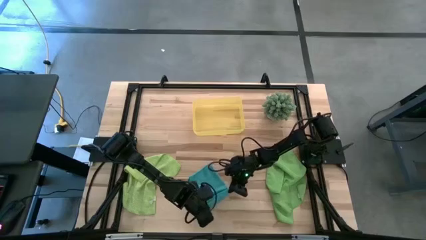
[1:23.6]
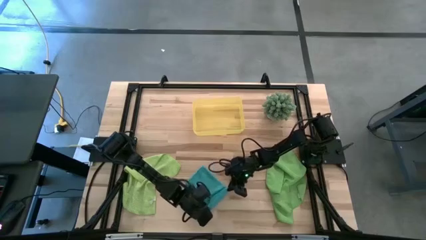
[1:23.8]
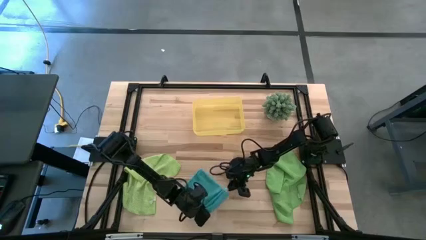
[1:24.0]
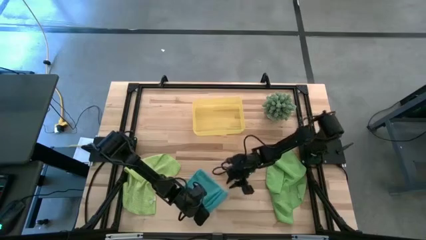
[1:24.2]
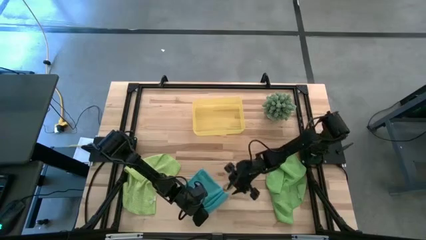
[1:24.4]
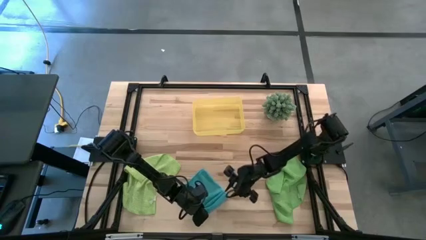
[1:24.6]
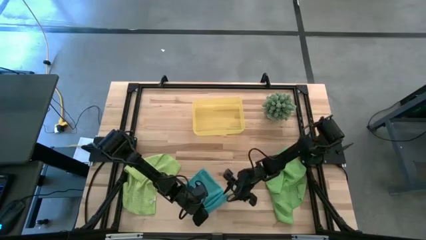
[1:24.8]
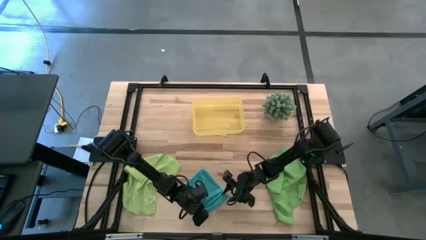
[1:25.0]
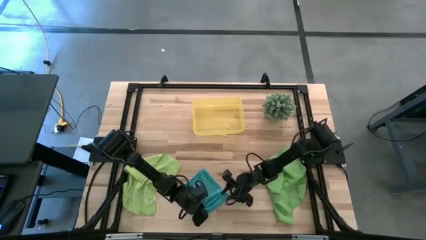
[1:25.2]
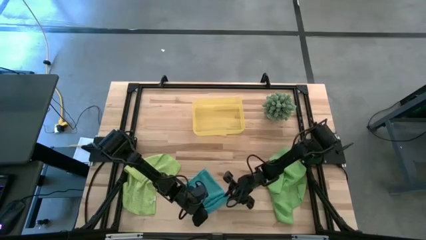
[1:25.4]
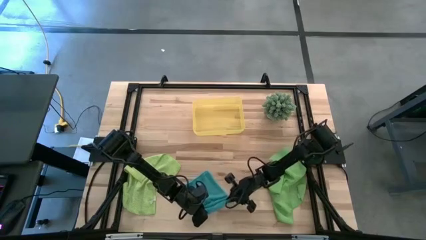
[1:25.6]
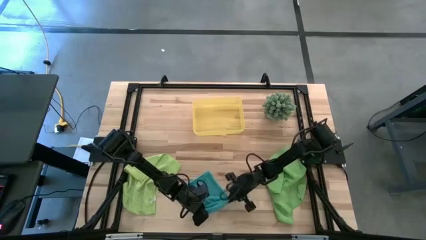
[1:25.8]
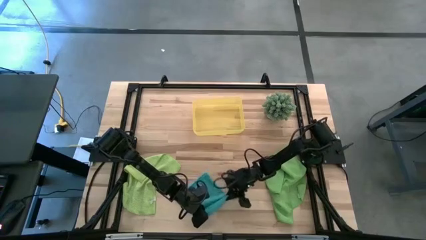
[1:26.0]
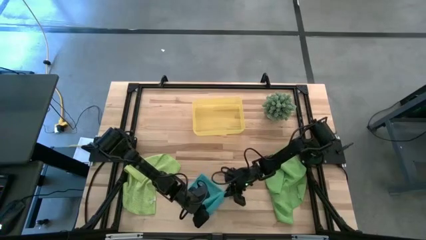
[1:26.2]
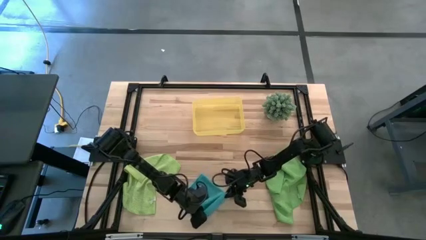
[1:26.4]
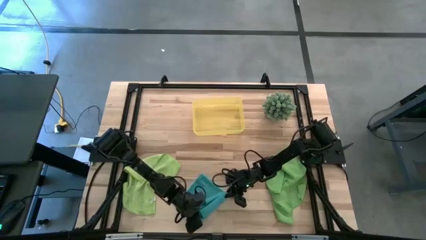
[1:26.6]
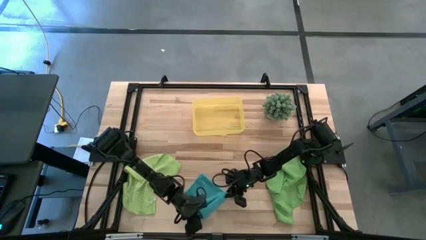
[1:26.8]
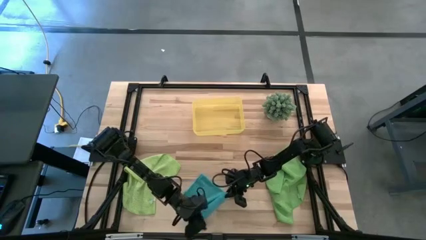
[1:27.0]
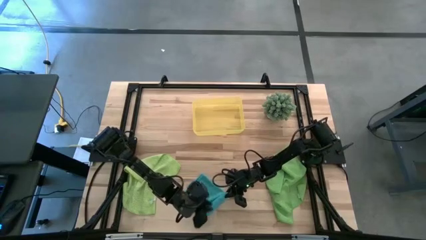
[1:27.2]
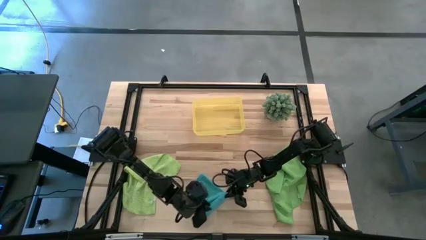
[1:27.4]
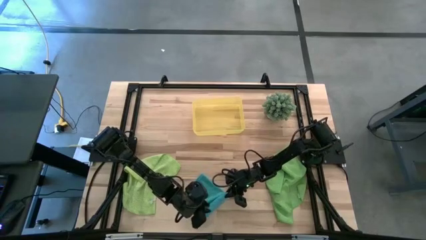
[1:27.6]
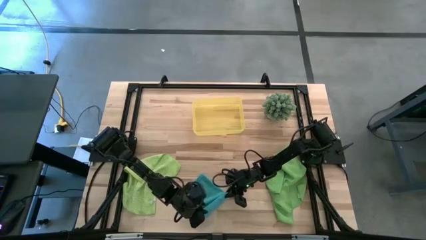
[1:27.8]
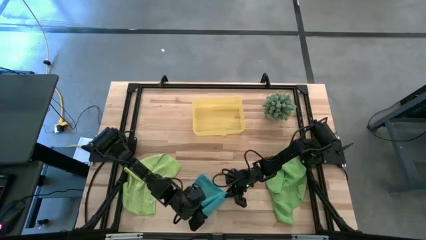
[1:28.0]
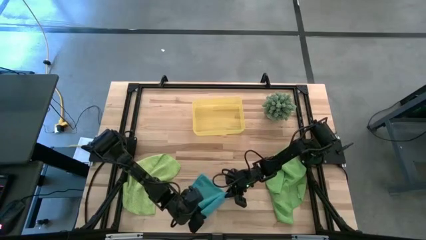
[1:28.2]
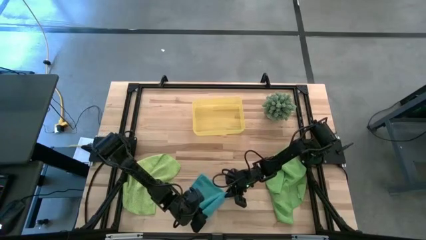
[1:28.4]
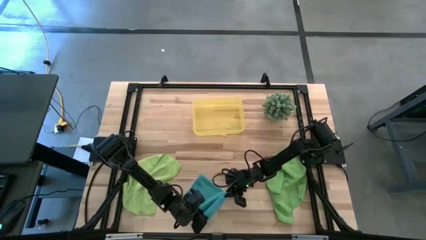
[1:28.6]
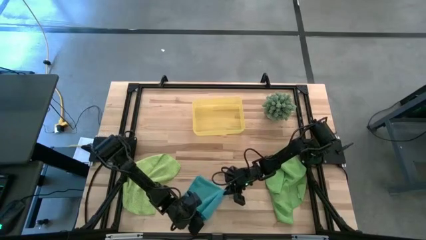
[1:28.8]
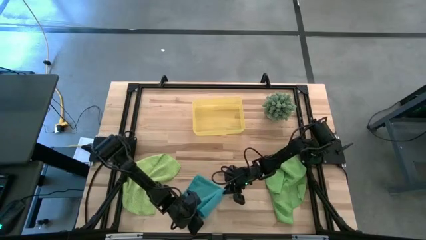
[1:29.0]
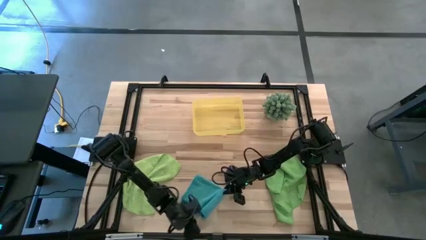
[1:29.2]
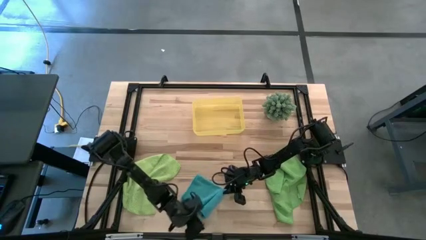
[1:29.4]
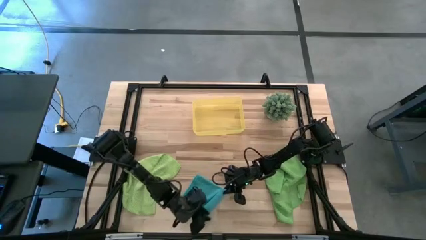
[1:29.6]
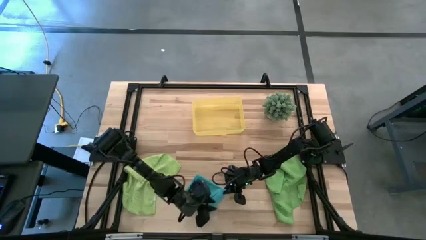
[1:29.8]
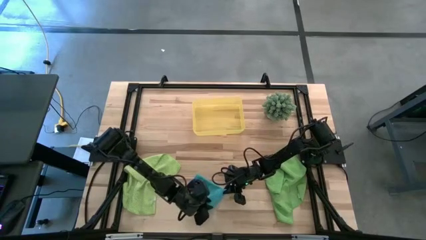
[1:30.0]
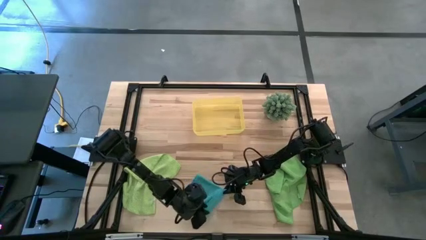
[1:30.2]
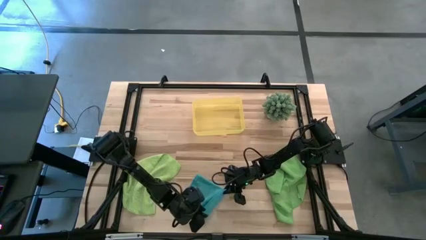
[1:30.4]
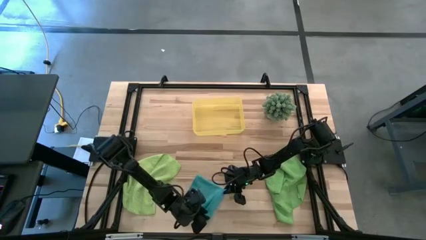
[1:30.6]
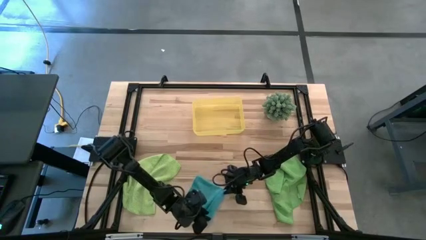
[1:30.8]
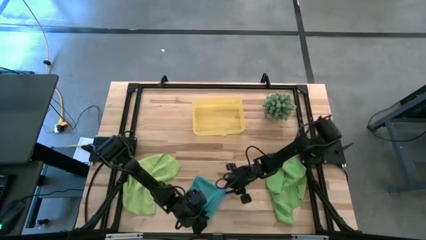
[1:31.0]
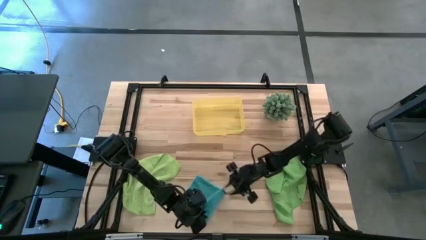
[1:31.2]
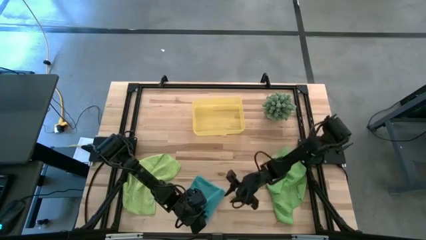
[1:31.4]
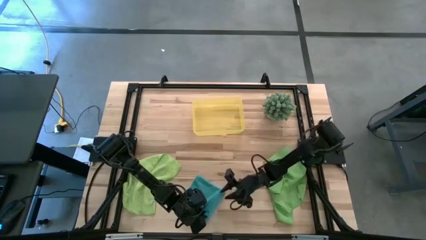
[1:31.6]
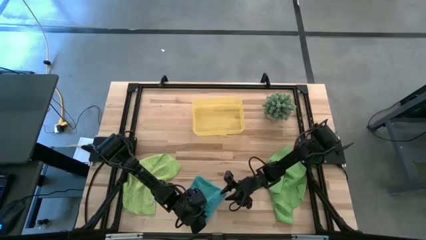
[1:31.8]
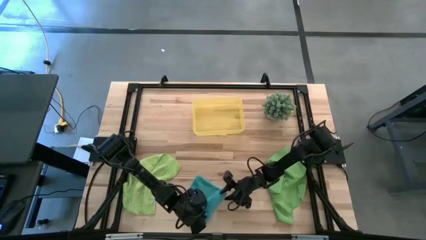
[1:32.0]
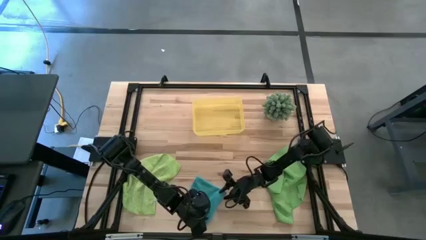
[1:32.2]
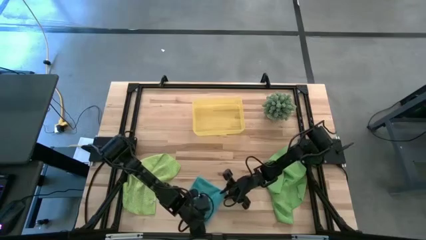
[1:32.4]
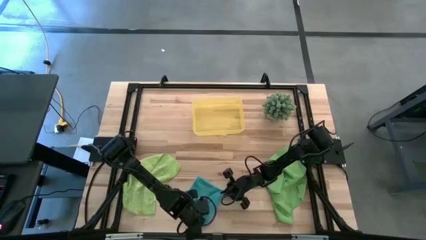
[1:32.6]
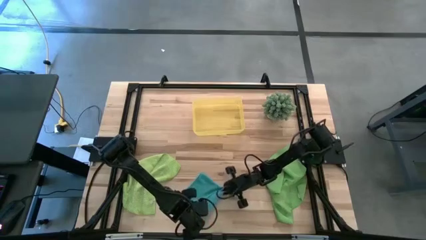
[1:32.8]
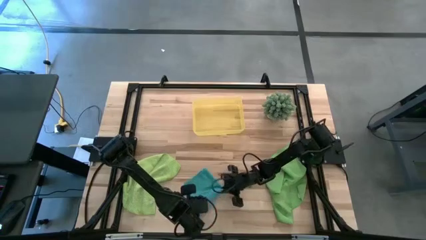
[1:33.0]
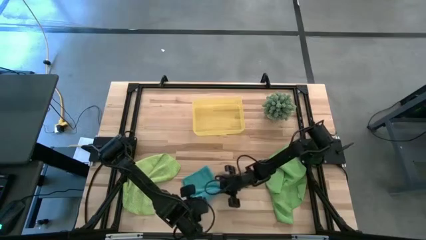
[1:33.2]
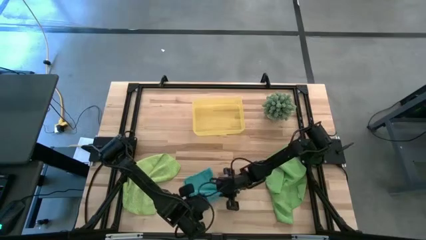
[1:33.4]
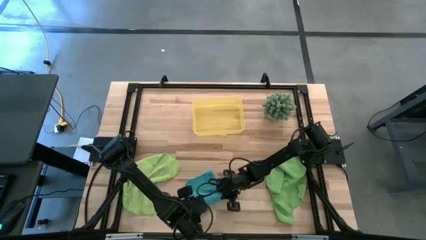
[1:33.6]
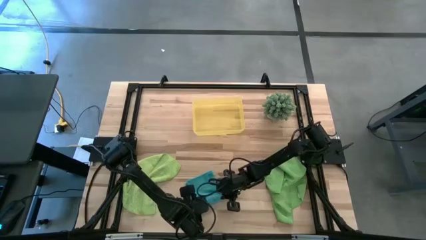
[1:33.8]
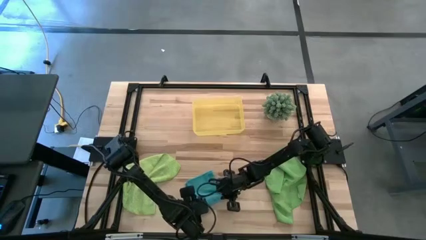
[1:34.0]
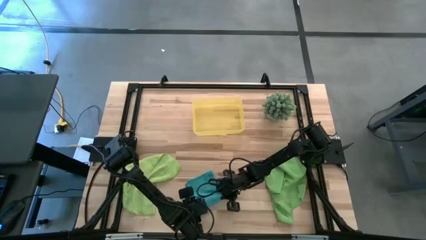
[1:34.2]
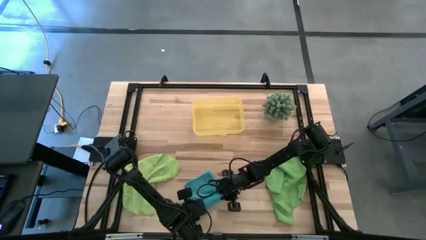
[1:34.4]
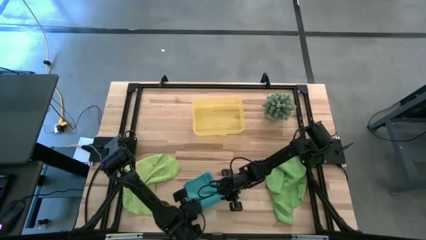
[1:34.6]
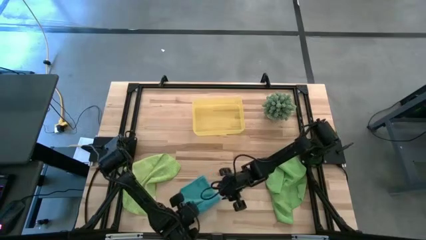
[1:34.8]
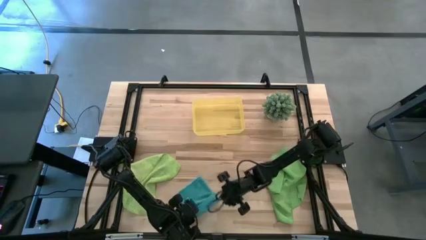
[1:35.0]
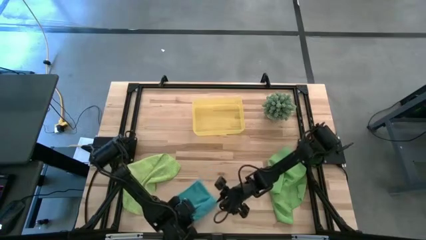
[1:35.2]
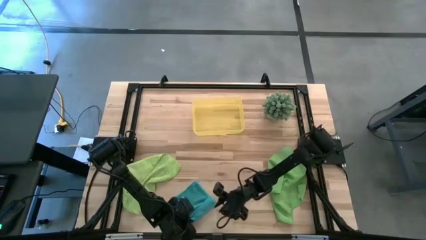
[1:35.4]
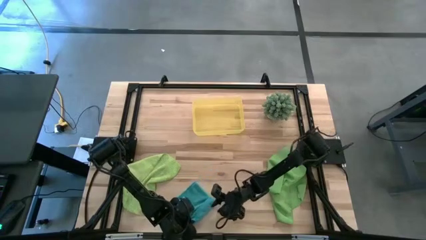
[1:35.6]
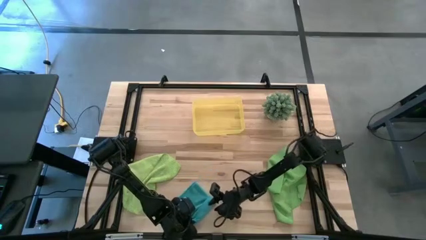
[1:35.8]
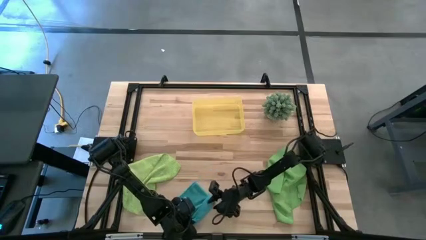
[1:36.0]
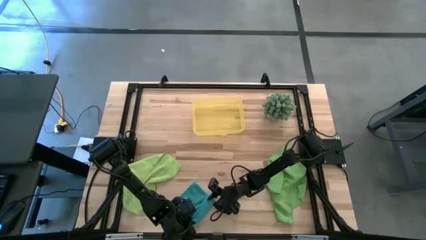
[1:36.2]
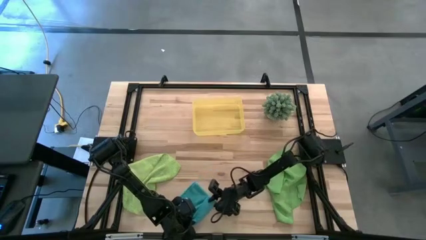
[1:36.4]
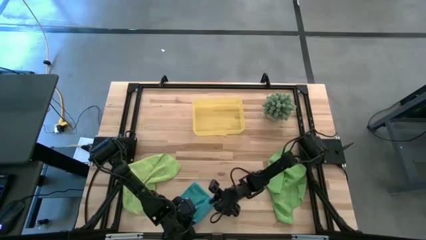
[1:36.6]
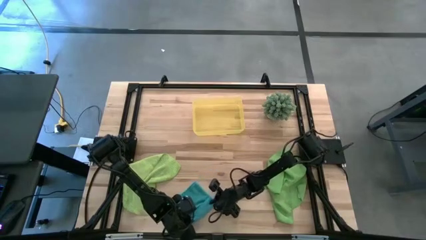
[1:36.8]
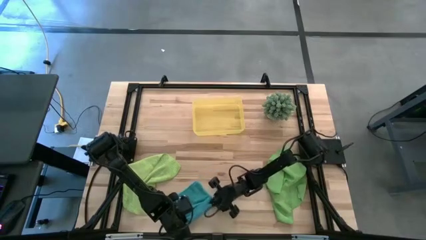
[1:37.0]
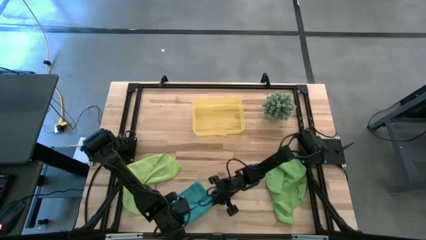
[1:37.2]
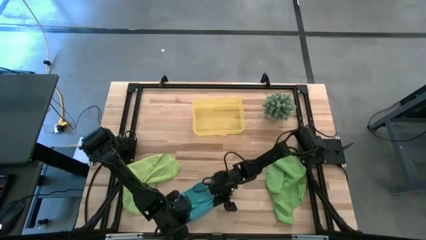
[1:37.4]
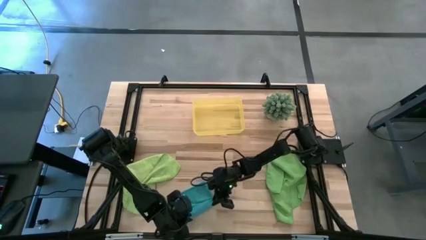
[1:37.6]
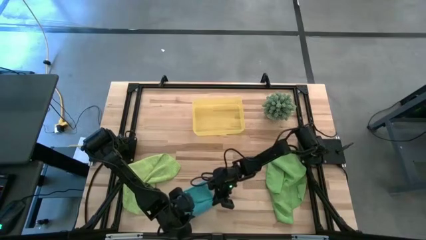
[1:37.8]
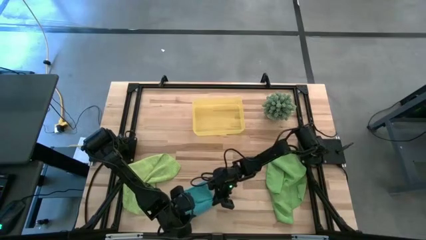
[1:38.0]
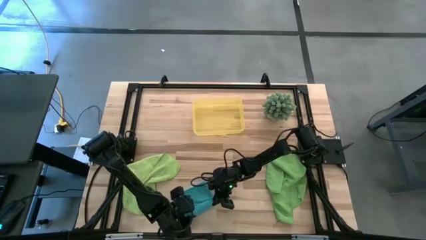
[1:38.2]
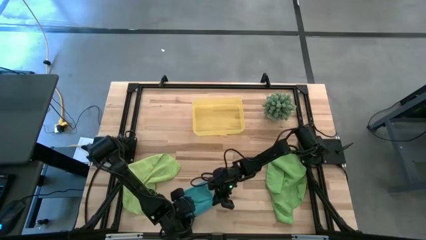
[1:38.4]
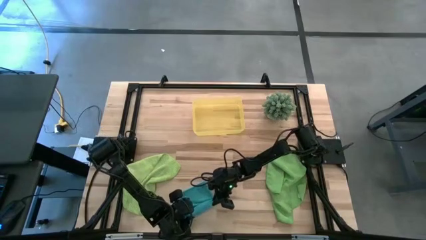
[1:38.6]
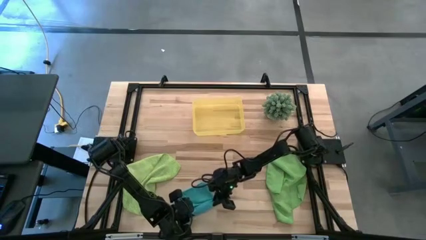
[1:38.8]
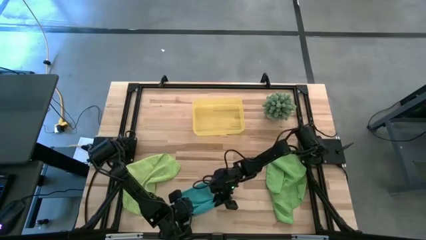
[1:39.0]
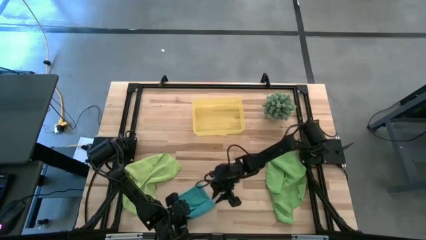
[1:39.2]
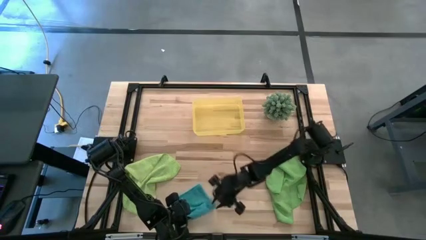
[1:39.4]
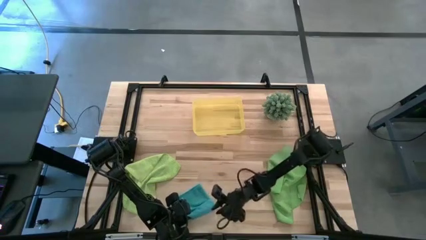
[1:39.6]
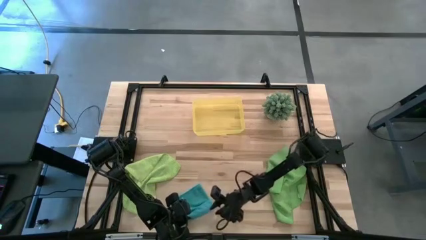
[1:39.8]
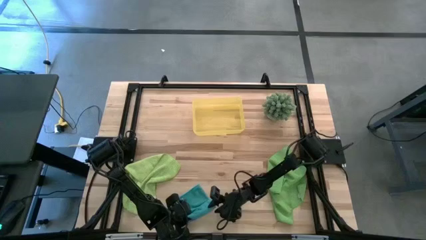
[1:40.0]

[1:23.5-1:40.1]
Task: Roll microfiber towels into tight, uniform cylinder then place into a basket
Roll the blue microfiber cloth
